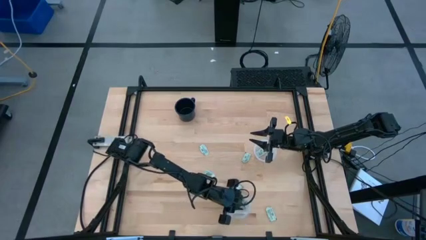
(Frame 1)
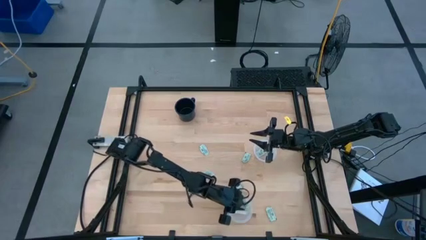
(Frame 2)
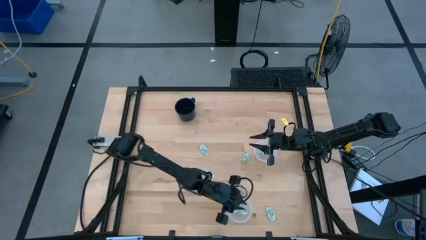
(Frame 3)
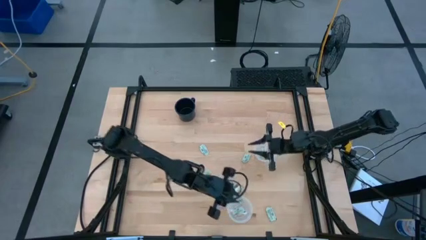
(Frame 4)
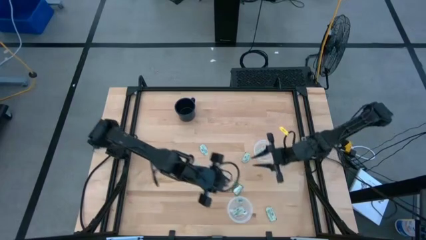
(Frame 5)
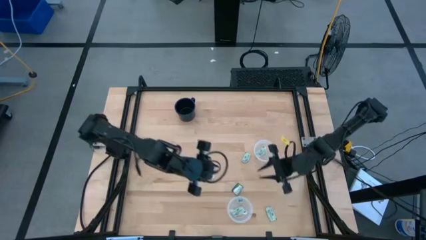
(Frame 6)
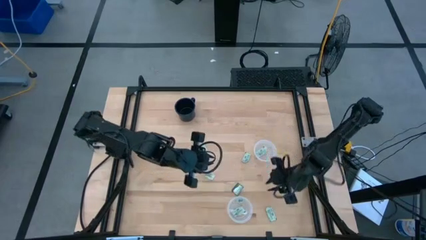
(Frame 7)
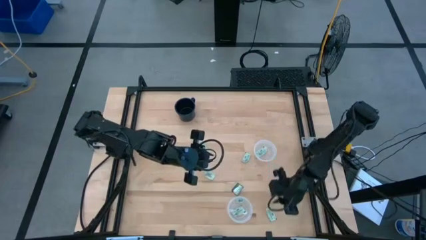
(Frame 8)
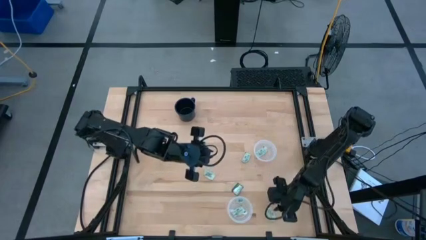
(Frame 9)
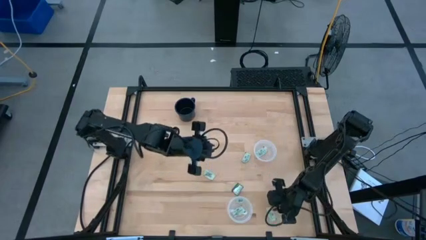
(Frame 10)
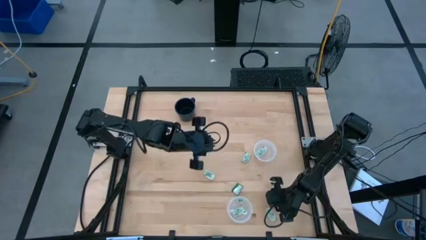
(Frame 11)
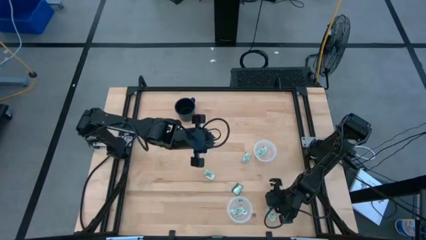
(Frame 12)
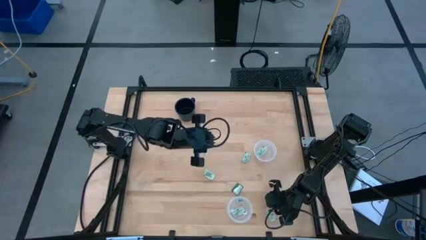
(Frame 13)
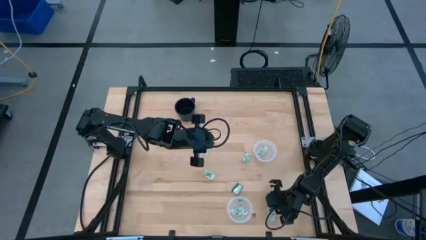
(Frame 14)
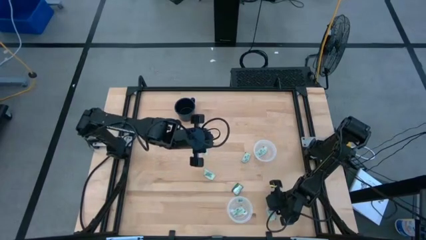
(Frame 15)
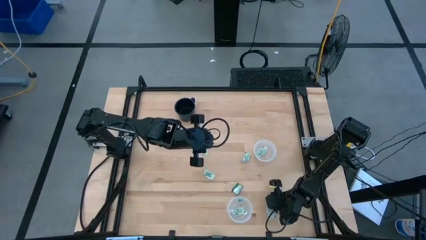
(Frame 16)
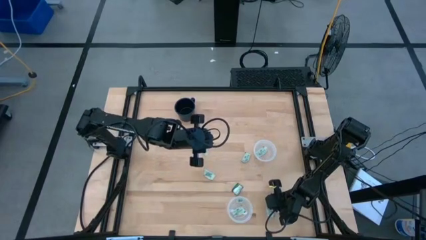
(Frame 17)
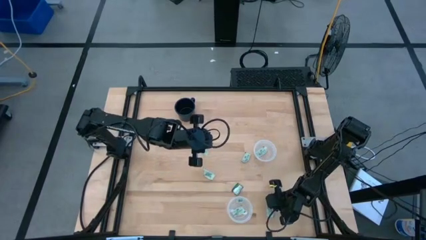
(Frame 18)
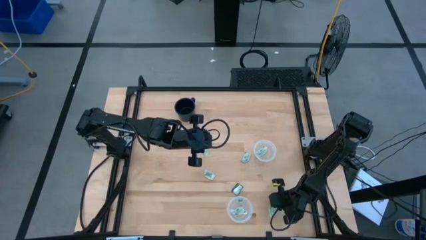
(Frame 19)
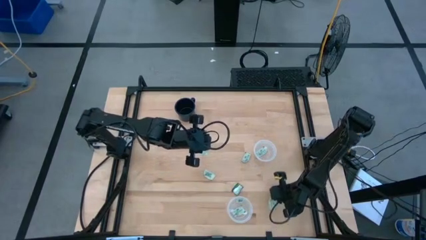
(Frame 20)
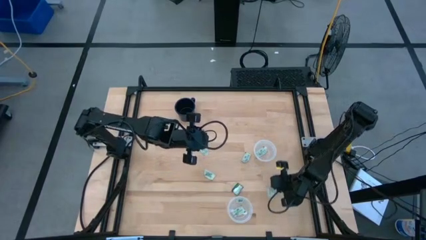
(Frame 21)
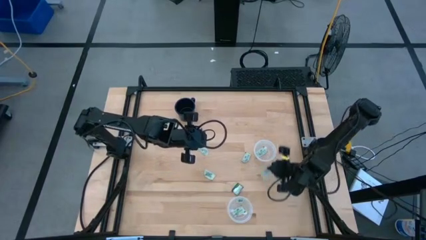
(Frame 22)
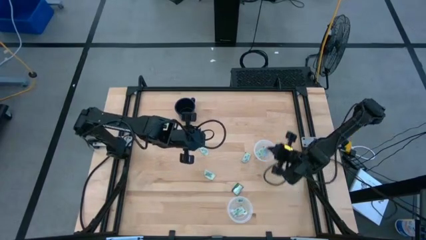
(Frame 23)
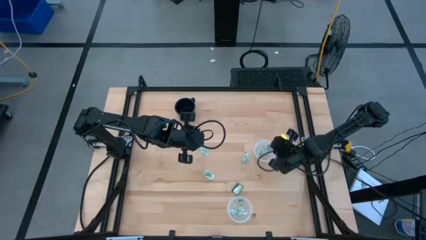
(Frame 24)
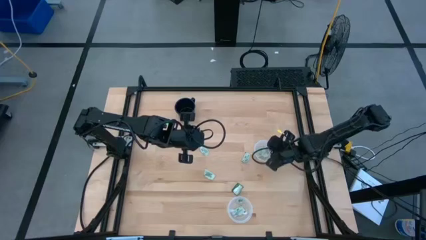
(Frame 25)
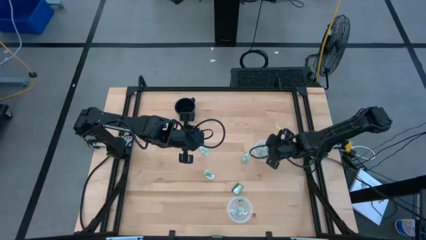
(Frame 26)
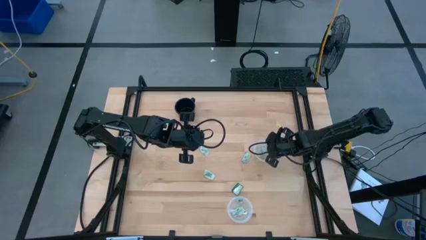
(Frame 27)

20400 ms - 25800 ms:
Task: Pick and place items into bin
Put the white stevia packet into the top bin

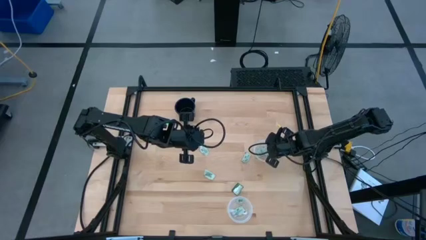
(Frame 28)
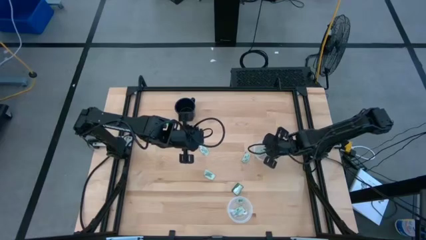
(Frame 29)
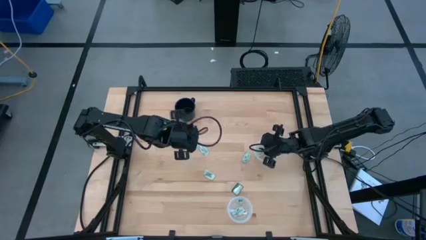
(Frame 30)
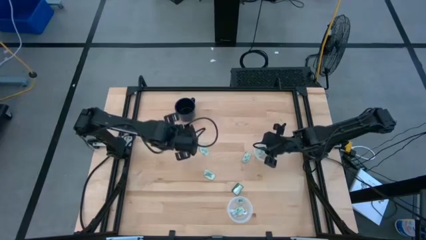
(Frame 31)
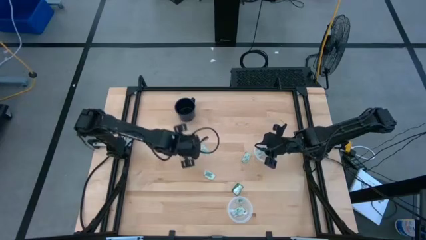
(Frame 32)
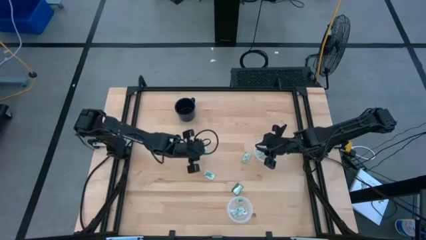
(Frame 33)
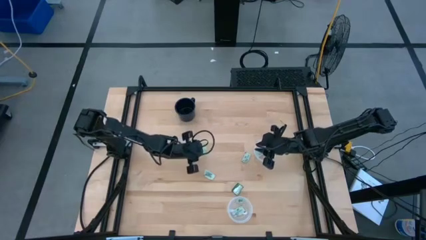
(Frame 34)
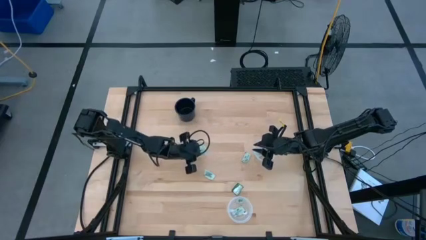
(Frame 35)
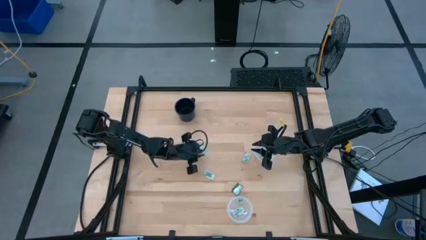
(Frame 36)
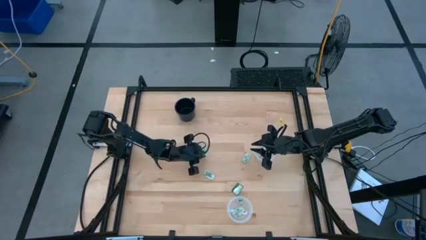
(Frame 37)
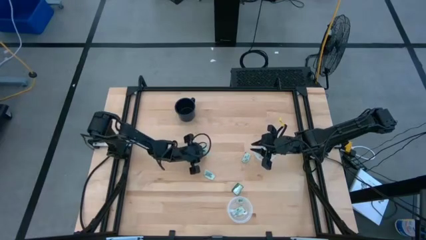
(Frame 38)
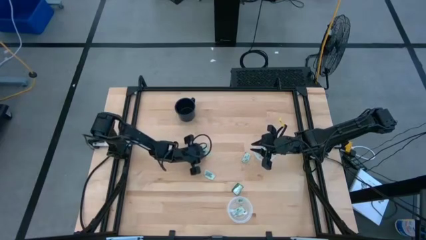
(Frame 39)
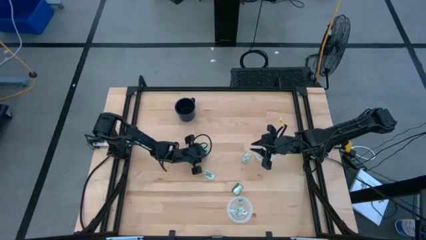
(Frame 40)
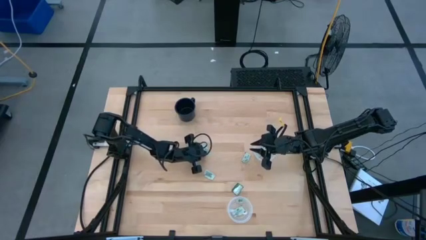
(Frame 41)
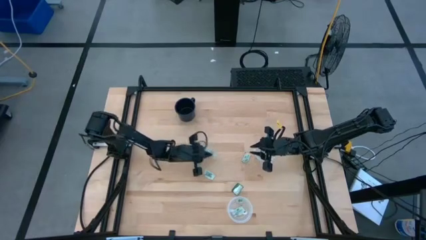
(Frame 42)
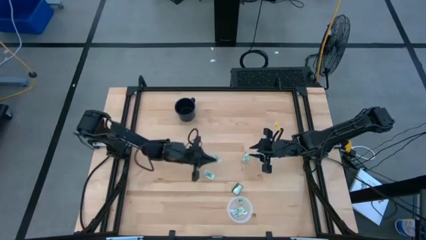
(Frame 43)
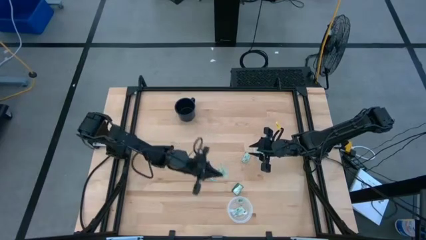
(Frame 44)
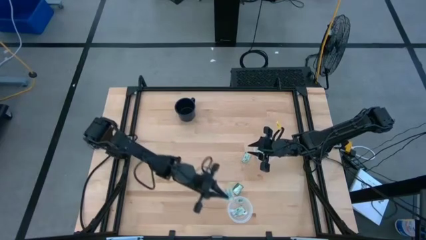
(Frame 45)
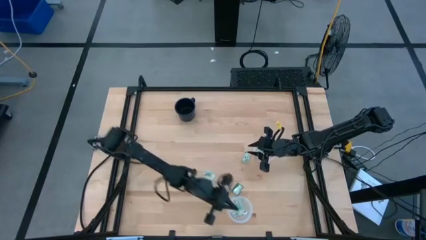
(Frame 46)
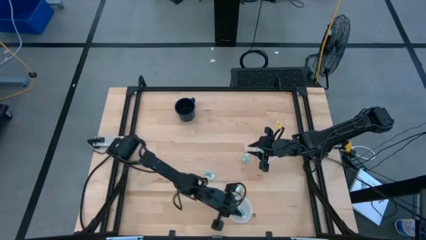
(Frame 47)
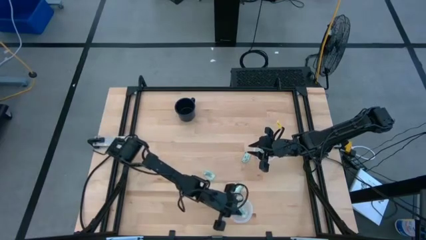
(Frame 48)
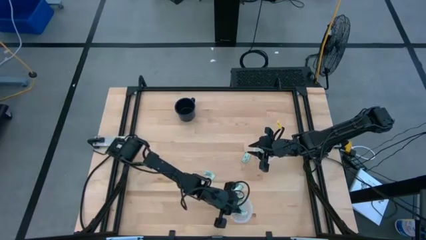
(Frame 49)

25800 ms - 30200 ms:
Put the white stevia packet into the bottom bin

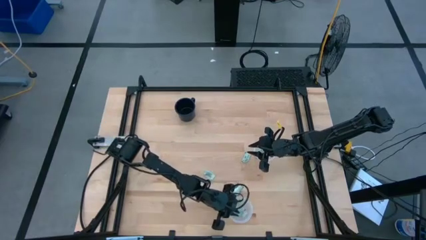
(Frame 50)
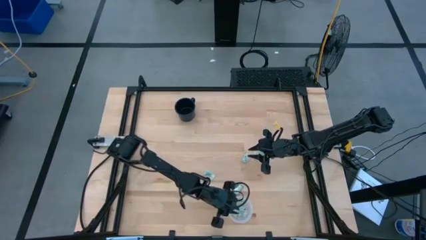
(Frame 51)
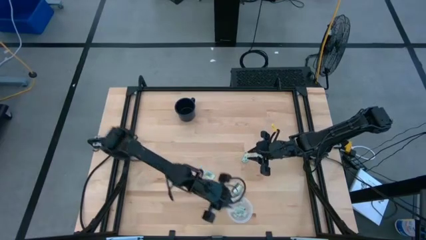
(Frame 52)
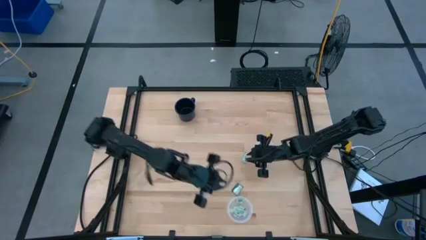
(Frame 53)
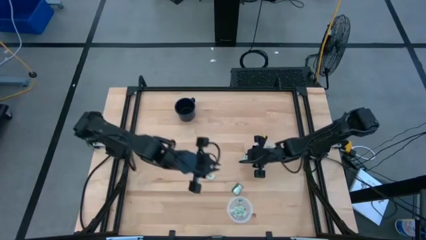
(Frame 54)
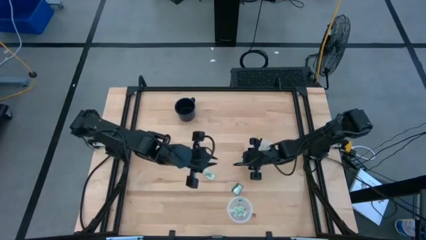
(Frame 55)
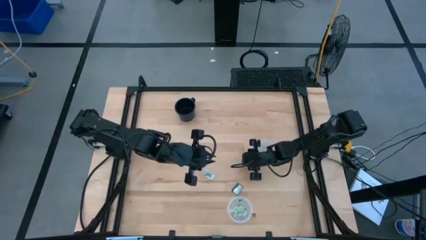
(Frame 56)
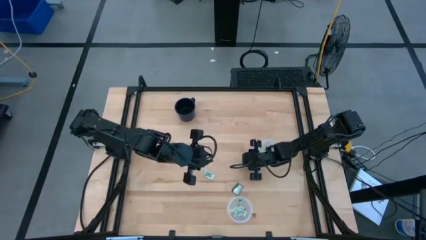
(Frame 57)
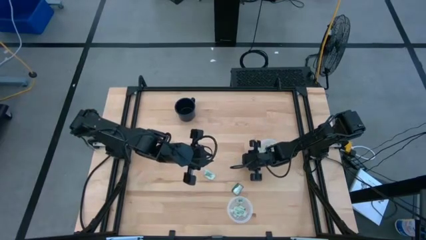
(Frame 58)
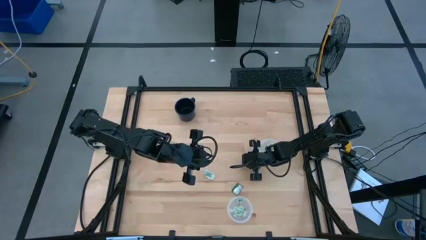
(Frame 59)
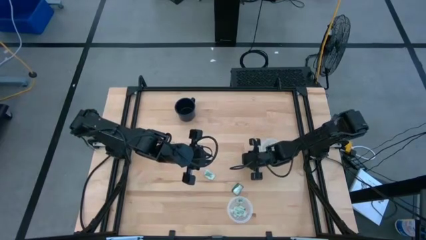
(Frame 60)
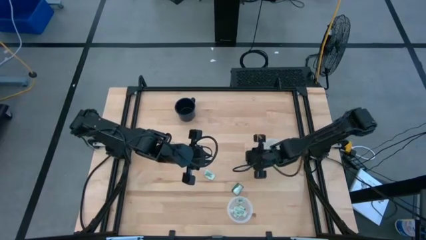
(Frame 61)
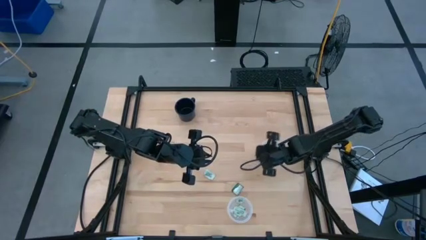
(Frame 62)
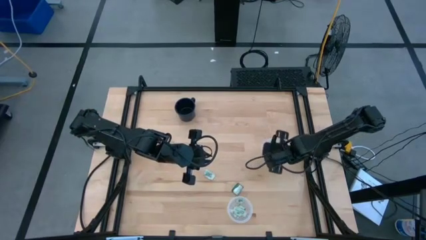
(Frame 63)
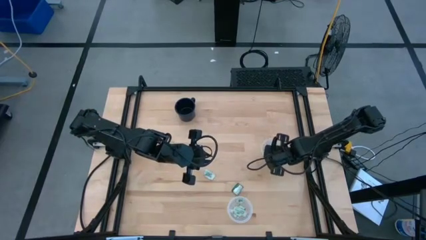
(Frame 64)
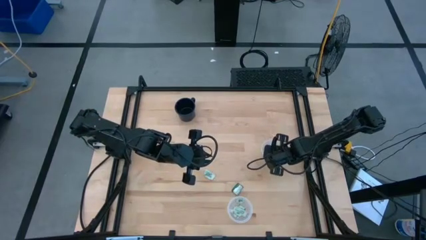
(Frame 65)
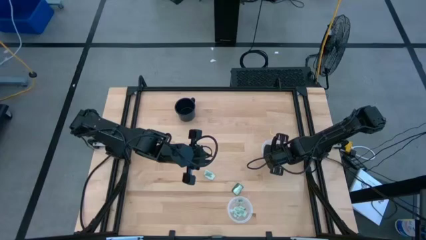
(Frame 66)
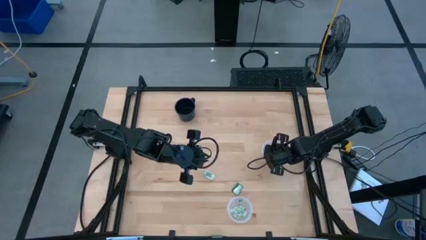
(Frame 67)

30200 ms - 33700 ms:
Put the white stevia packet into the top bin

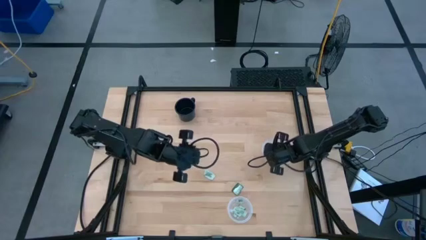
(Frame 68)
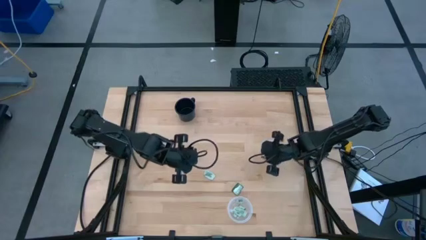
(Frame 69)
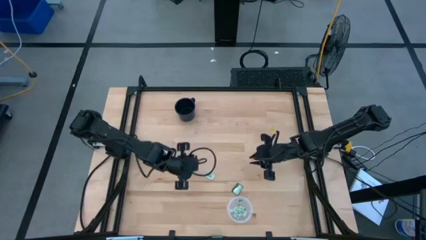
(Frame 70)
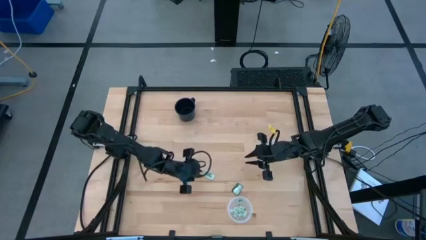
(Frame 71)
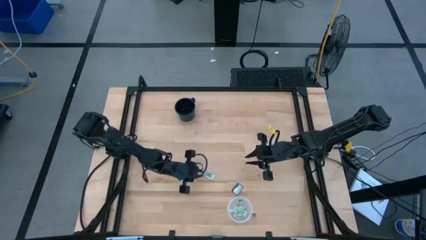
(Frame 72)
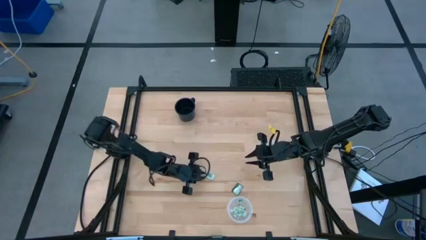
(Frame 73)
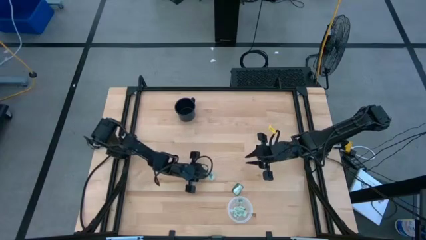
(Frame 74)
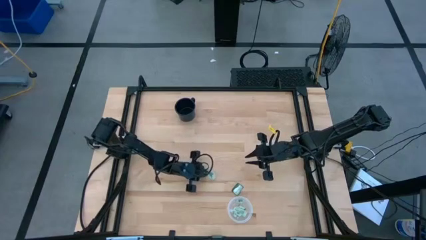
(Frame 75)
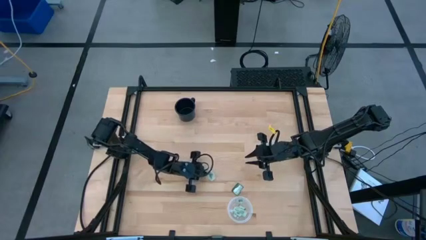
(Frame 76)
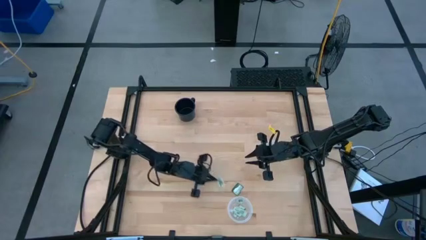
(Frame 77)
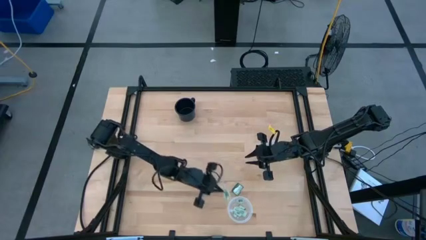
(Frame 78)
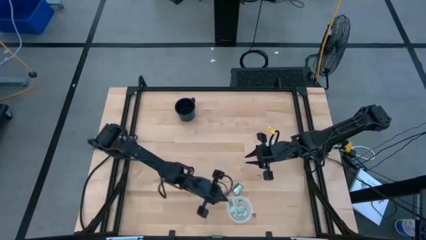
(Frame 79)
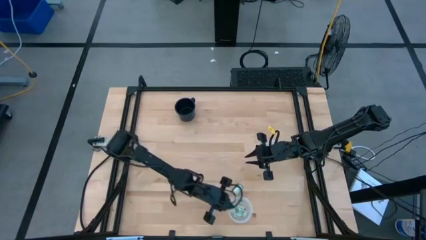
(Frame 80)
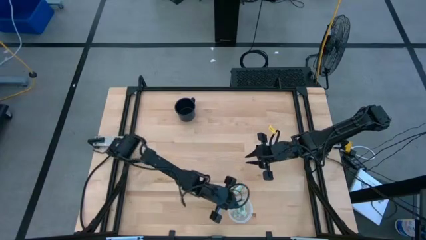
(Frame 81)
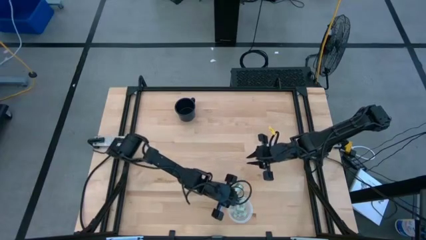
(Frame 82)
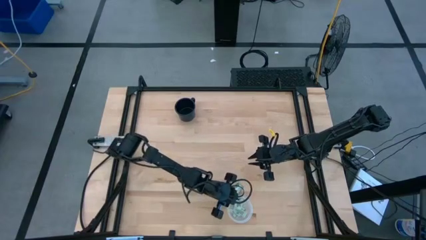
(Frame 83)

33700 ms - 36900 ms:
Put the white stevia packet into the bottom bin
